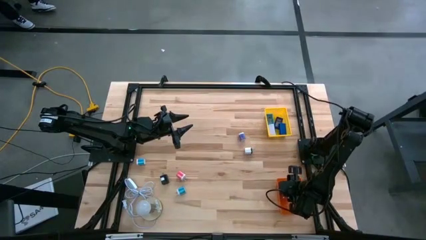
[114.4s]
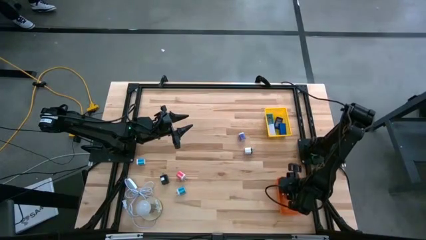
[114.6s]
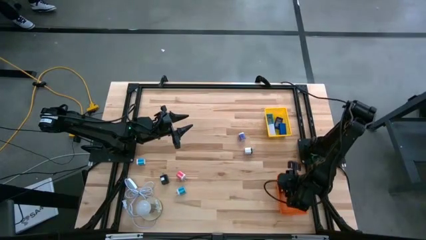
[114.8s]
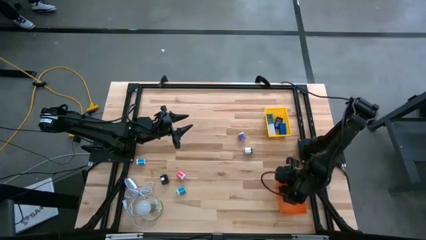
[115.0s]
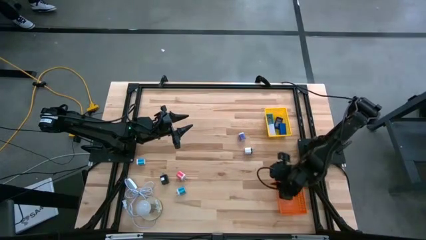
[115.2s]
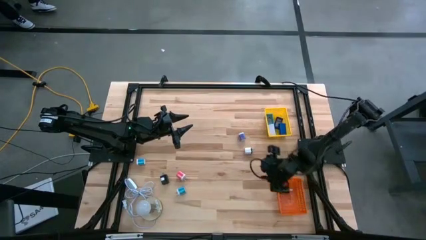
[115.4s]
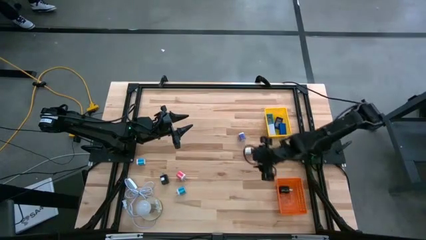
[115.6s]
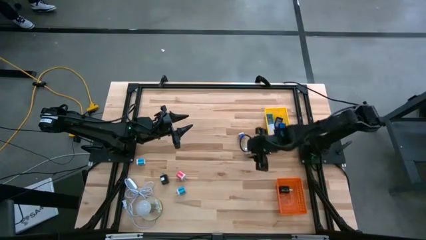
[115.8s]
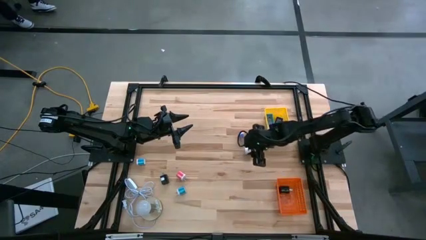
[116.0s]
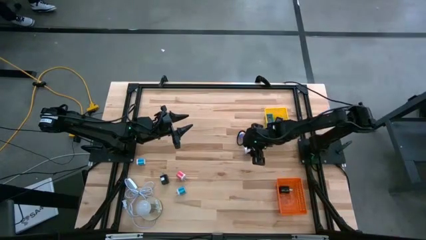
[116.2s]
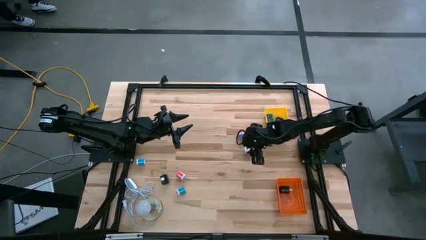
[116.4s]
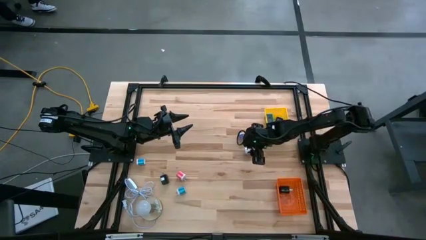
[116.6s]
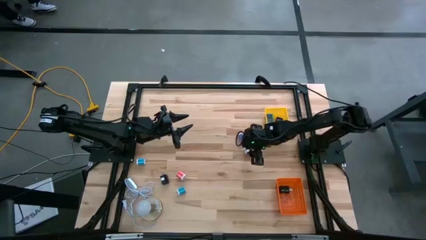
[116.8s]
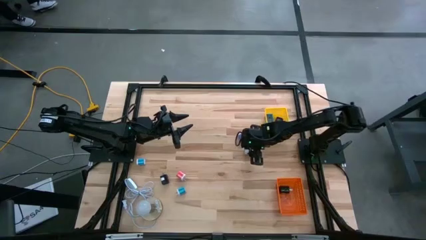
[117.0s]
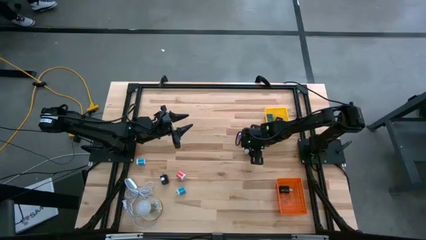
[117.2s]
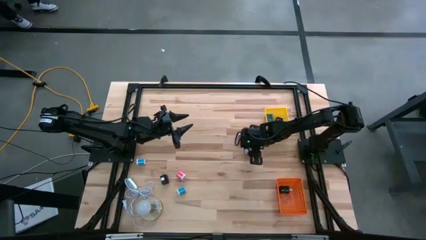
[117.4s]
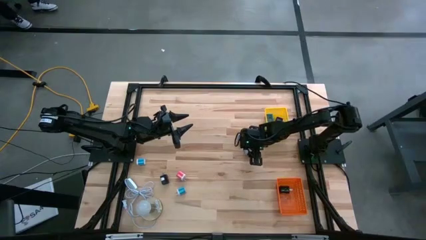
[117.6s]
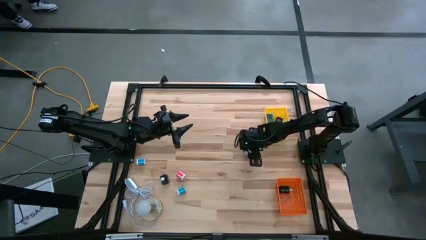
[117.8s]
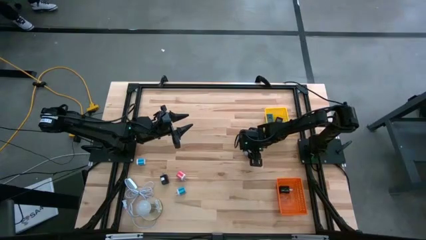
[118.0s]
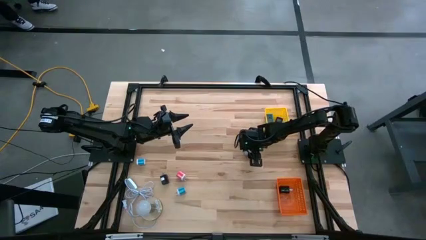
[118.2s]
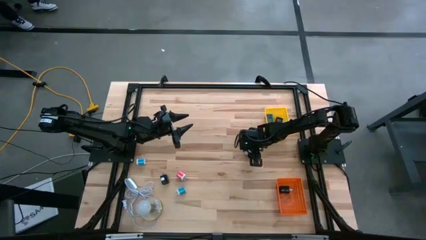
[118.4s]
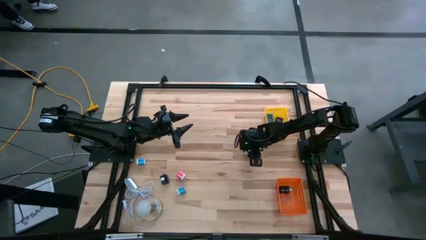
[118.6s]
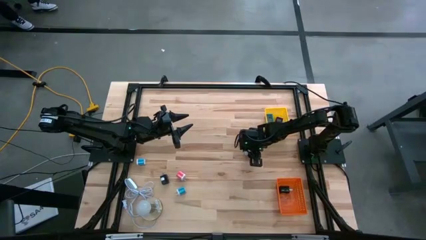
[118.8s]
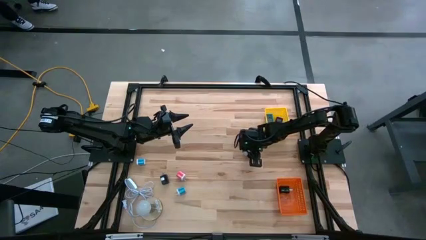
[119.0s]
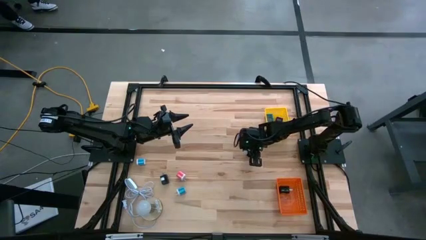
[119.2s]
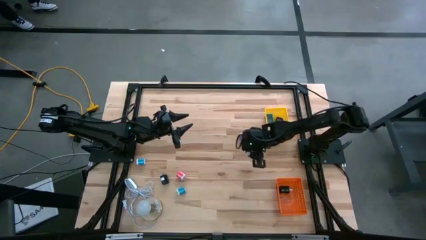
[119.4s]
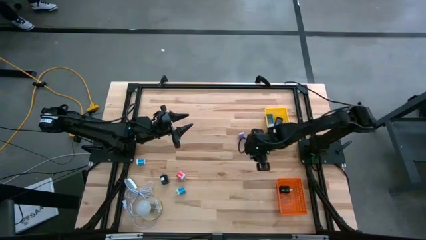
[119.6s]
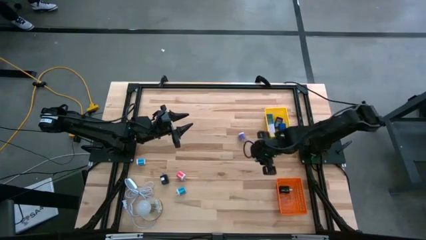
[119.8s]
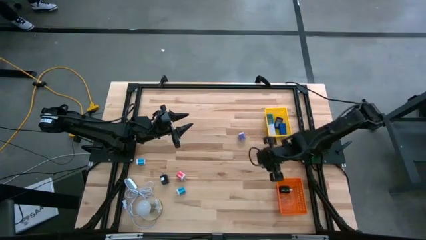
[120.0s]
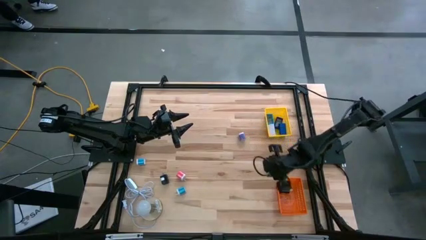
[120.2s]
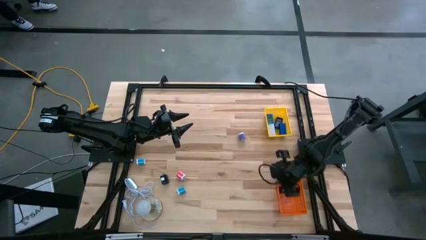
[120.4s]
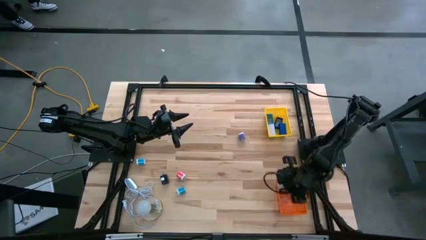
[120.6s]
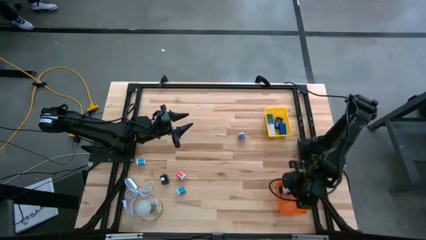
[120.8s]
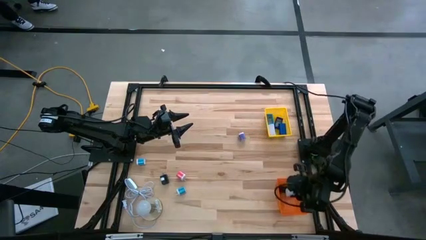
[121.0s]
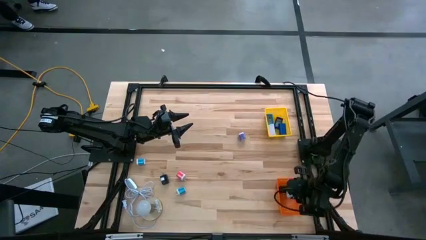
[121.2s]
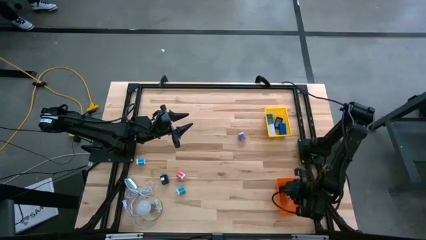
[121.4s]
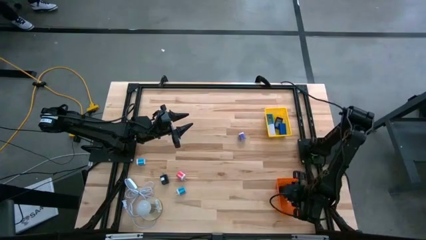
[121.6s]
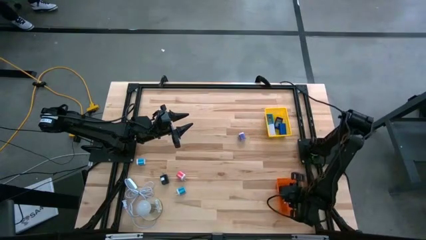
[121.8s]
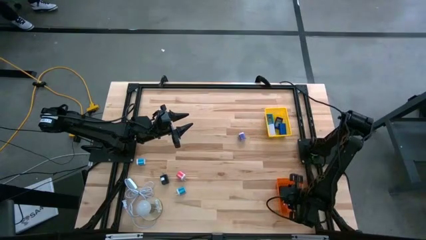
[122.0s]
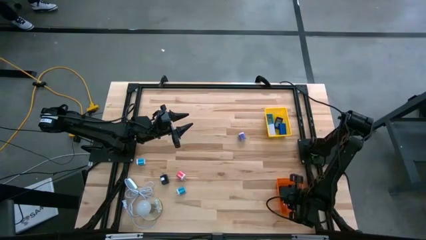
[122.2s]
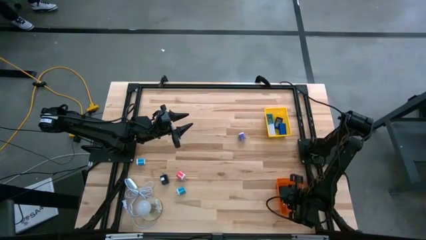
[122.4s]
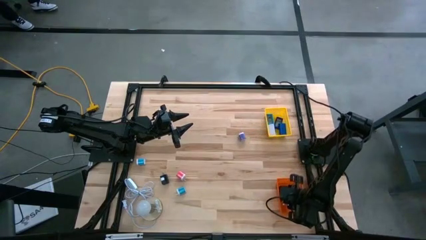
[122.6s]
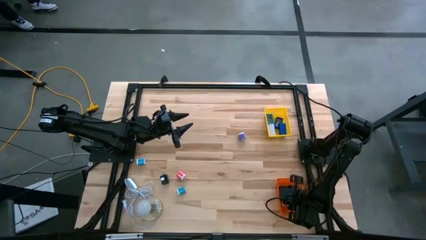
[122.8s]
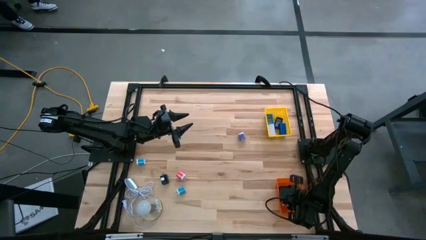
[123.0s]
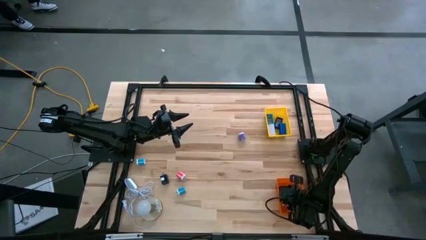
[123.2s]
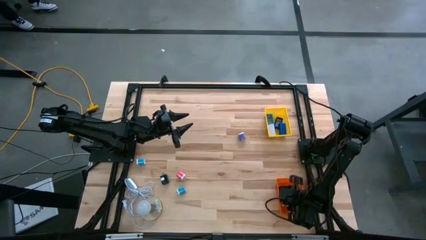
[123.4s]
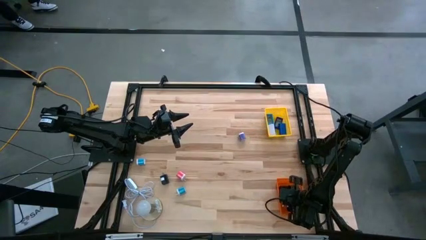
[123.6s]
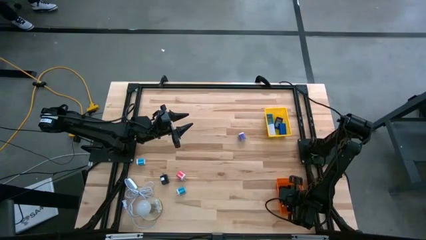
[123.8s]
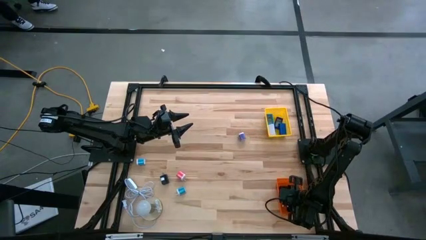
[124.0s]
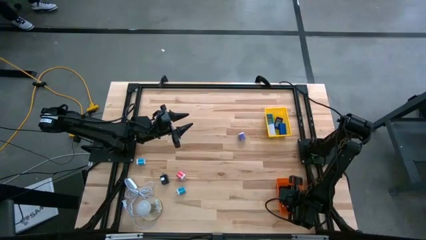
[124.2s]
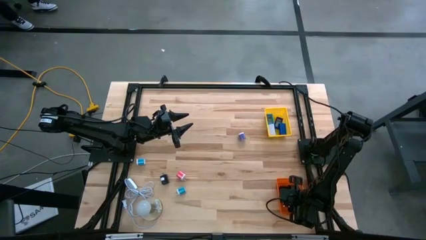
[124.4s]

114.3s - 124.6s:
Task: Pick & Place Office items
Put the white charger adapter into the orange bin

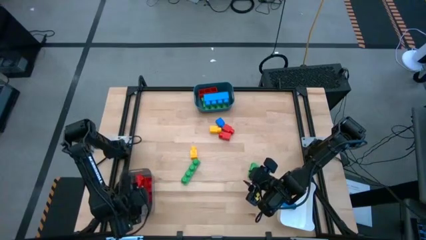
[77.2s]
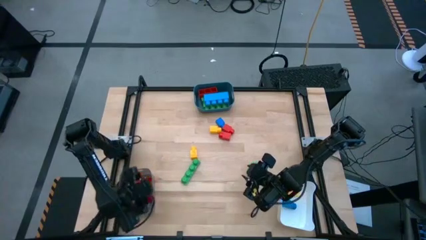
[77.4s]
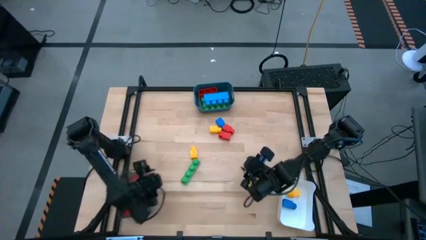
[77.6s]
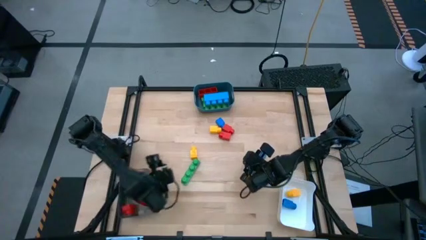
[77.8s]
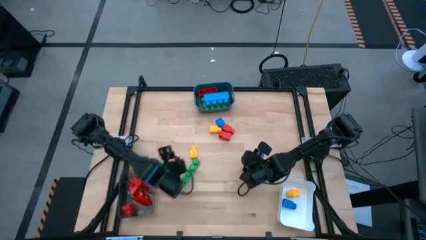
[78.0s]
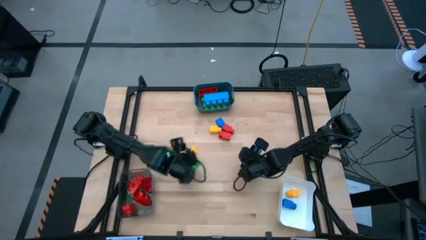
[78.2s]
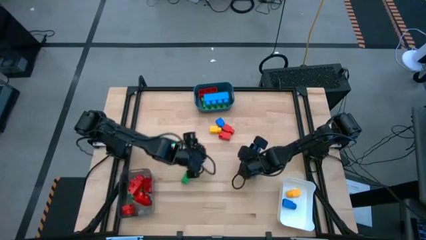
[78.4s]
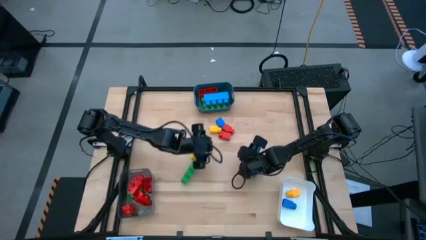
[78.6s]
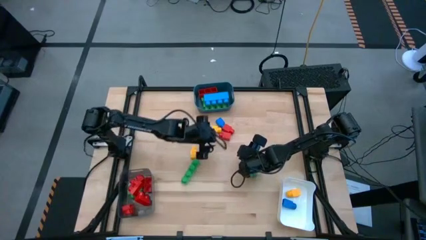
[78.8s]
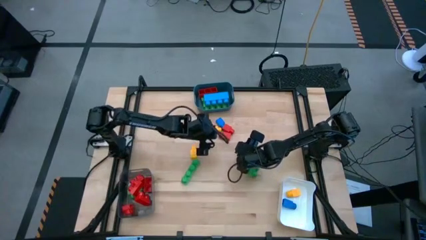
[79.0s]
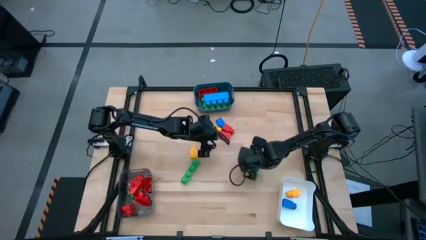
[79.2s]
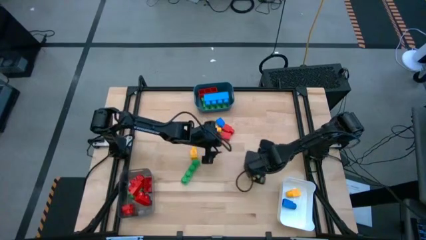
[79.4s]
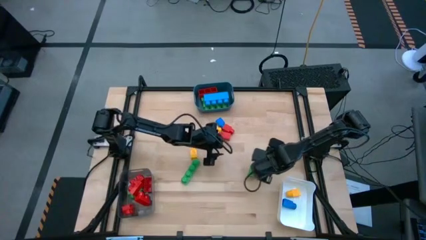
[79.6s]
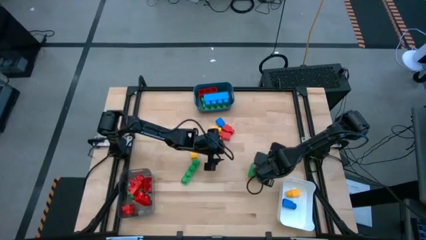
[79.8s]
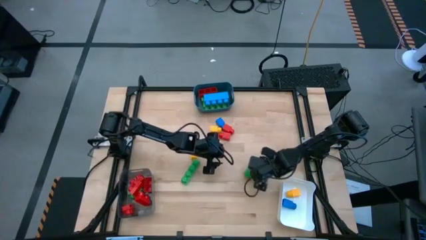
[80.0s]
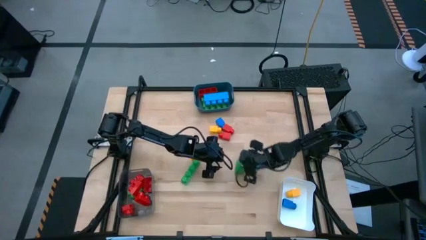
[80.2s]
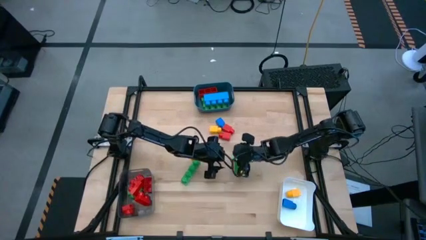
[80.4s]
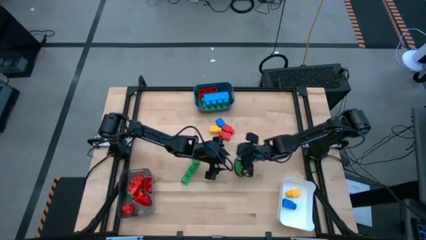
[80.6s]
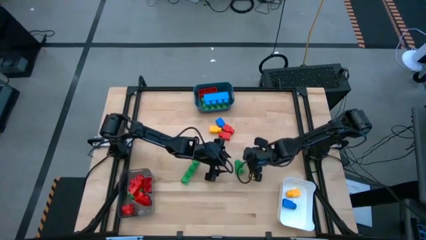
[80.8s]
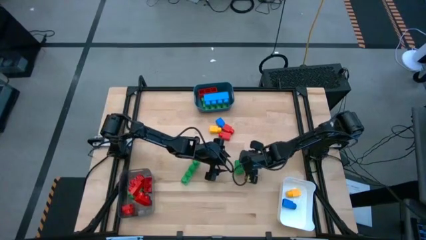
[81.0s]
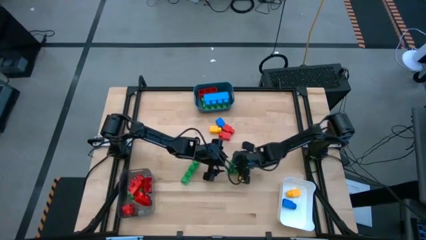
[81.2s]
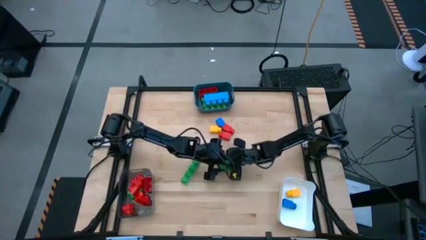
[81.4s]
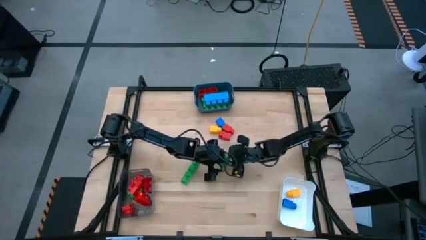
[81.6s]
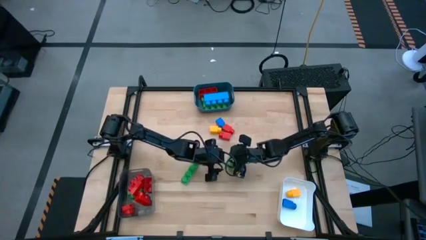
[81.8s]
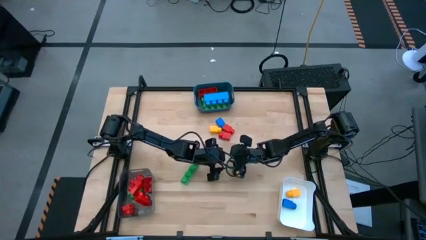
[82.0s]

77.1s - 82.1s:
Task: Sort blocks by size
Move the green game piece from the edge of the table

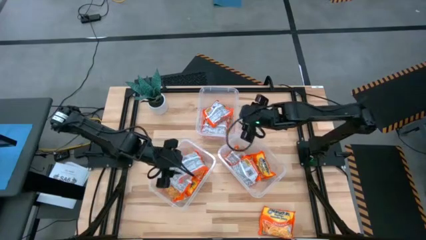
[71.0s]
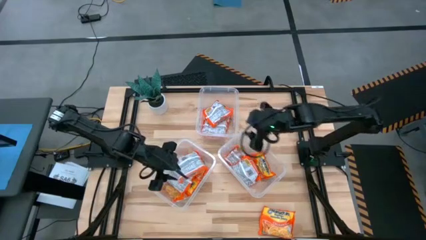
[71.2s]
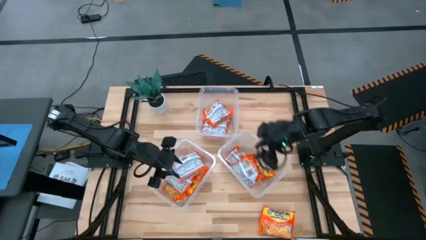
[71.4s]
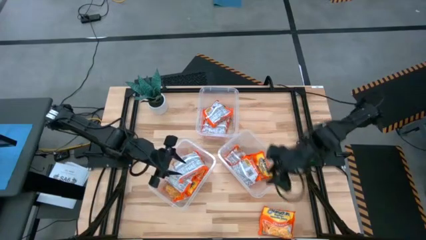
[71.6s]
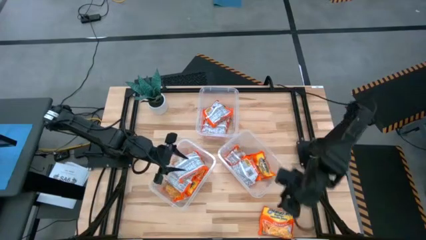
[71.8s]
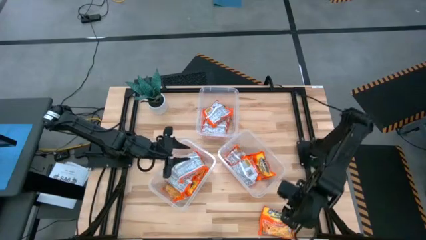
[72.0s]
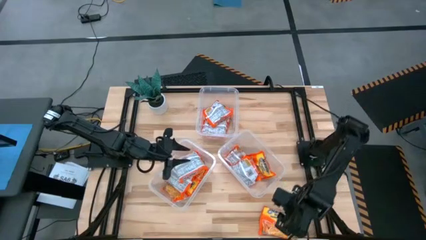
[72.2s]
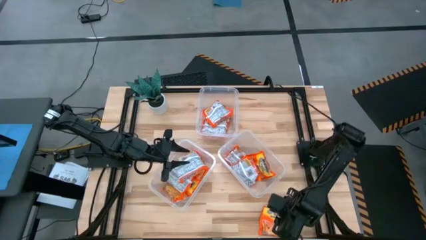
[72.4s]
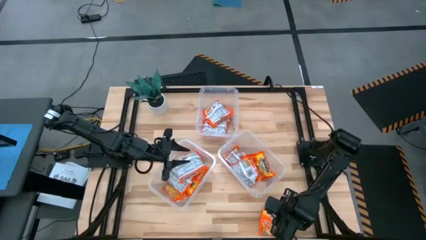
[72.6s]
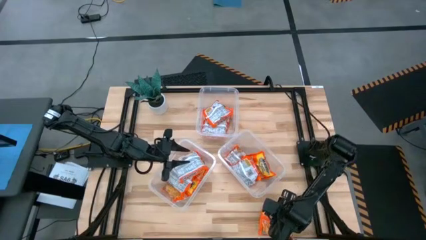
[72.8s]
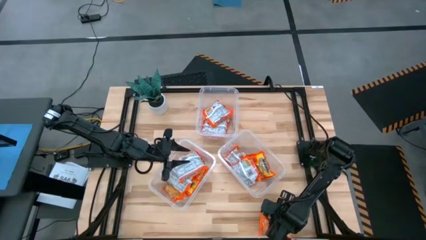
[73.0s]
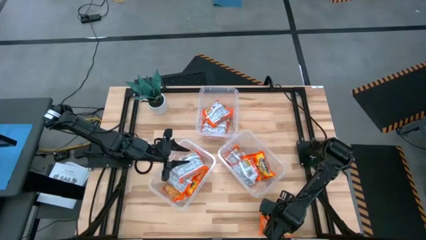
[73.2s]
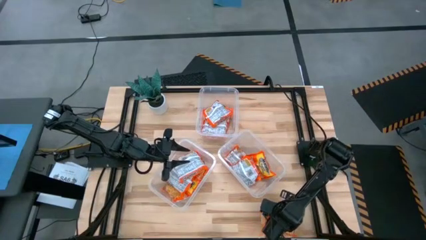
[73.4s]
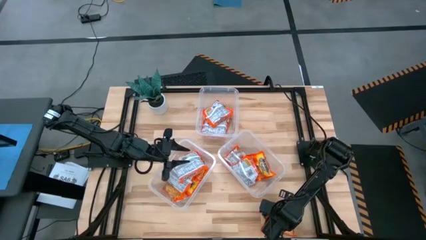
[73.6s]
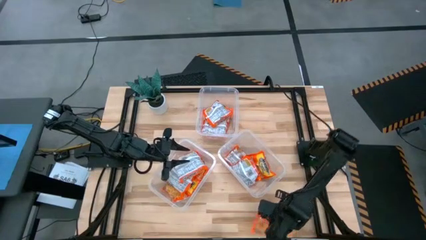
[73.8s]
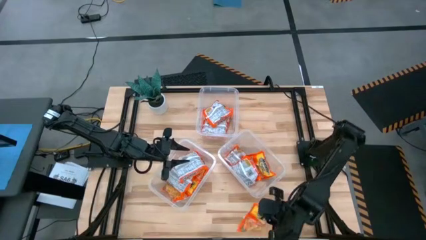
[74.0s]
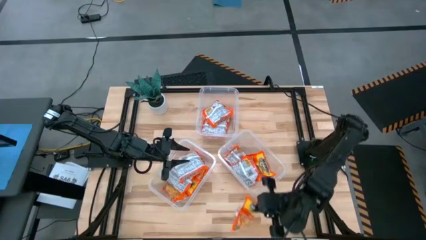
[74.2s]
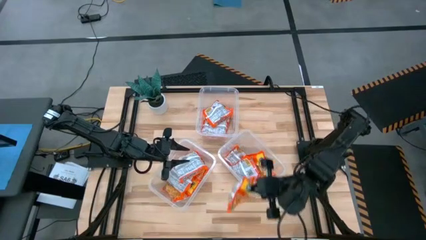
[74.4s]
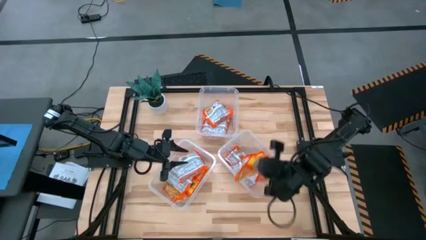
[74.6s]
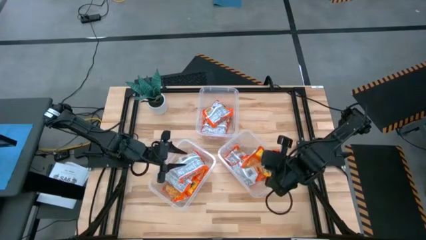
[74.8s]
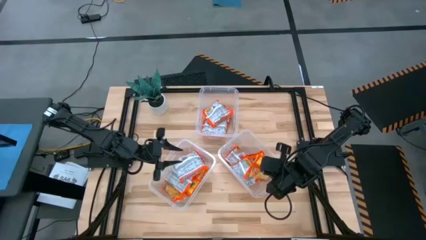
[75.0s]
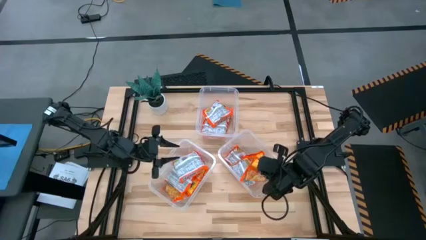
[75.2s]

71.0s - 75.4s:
Task: Sort Maruchan noodles
Put the noodle pack into the bottom right transparent bin
